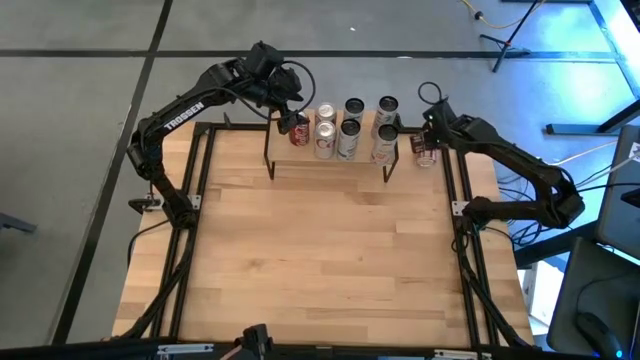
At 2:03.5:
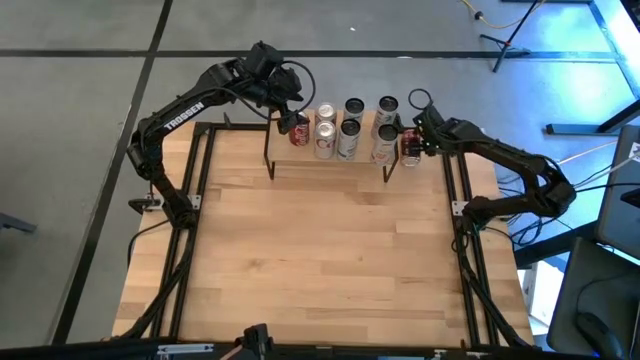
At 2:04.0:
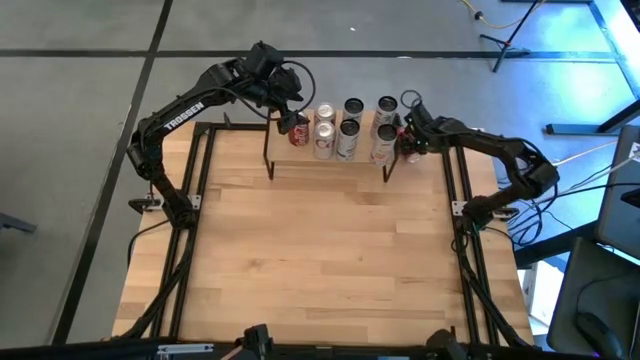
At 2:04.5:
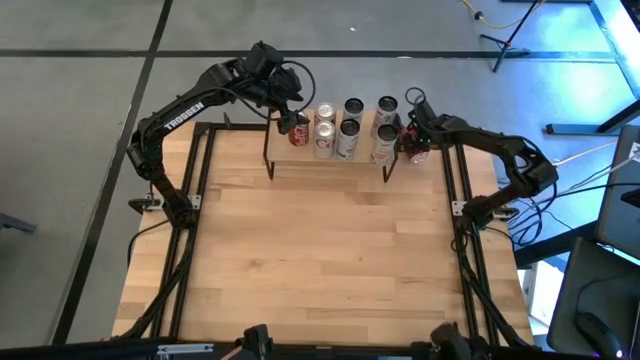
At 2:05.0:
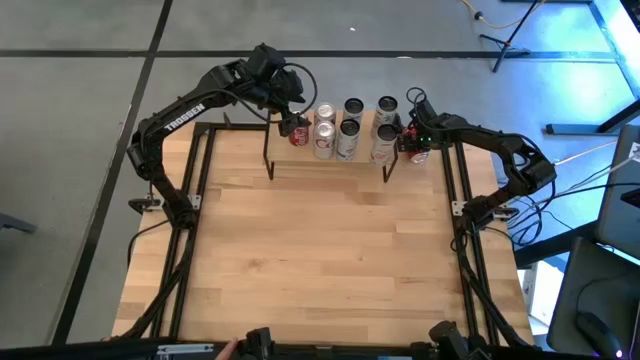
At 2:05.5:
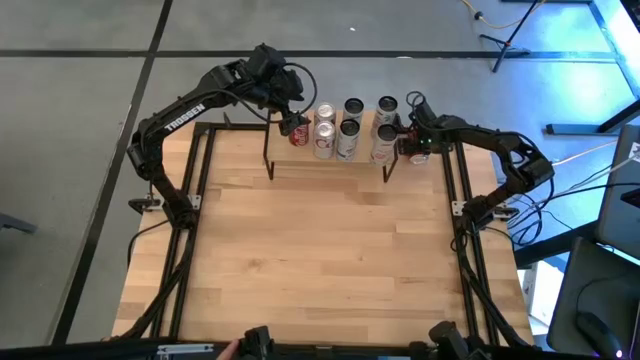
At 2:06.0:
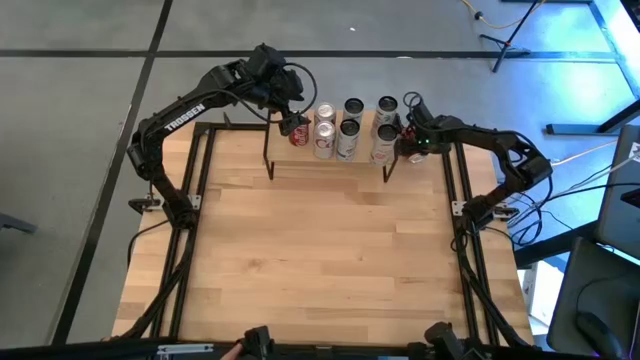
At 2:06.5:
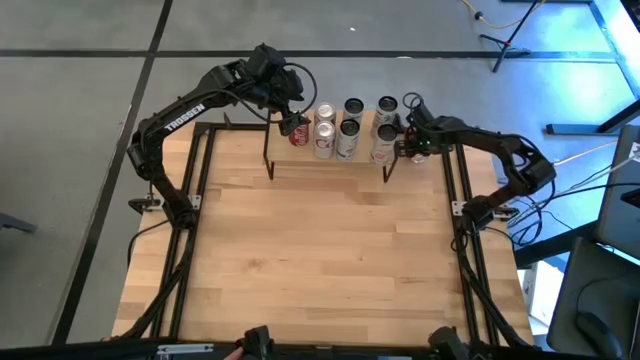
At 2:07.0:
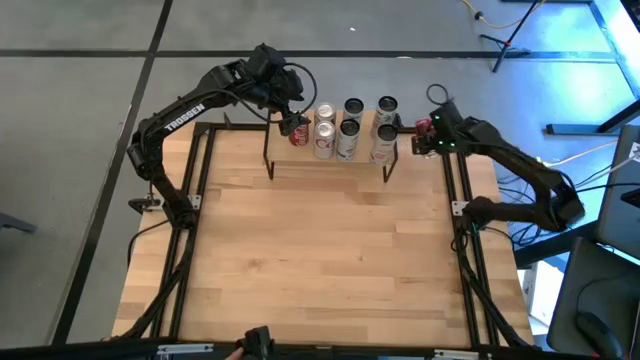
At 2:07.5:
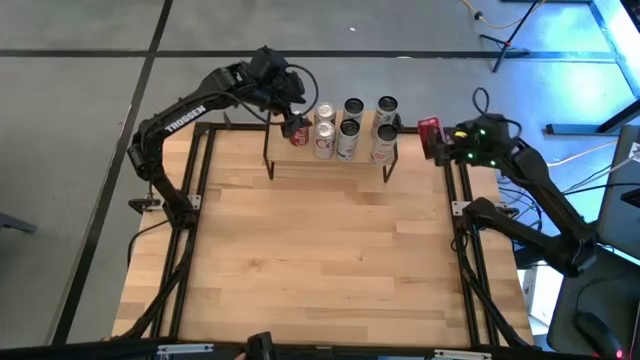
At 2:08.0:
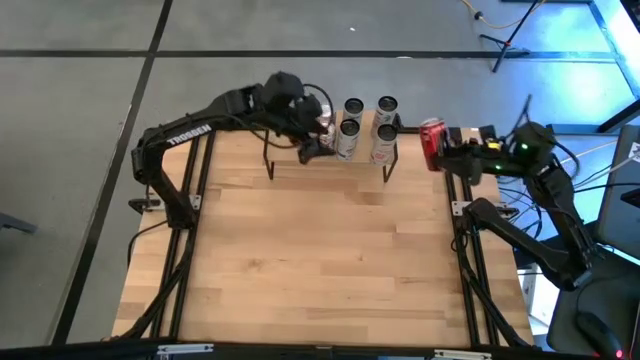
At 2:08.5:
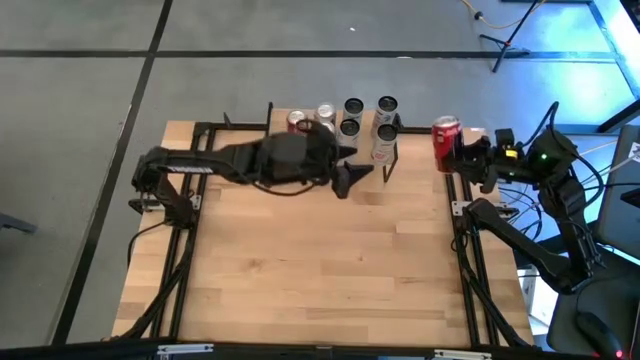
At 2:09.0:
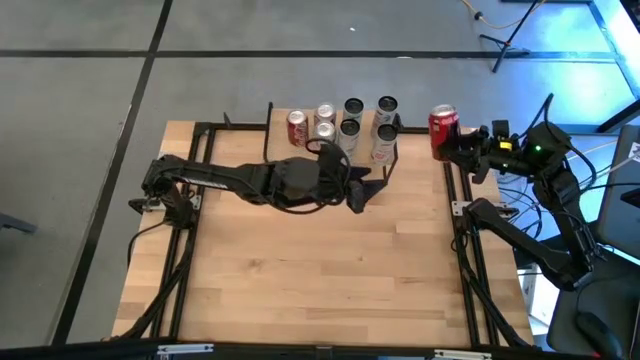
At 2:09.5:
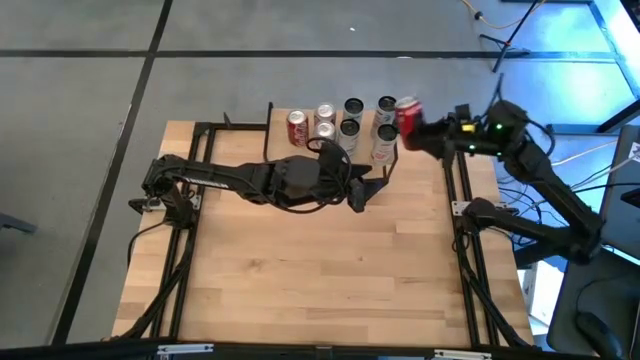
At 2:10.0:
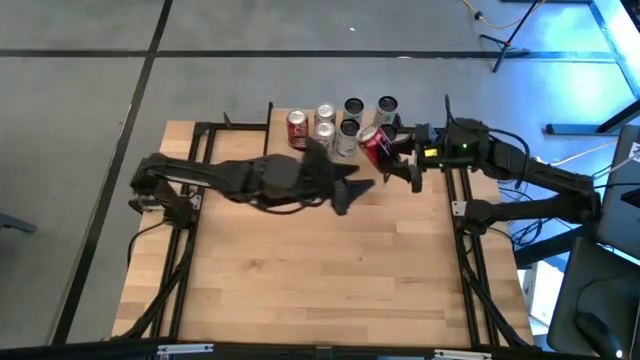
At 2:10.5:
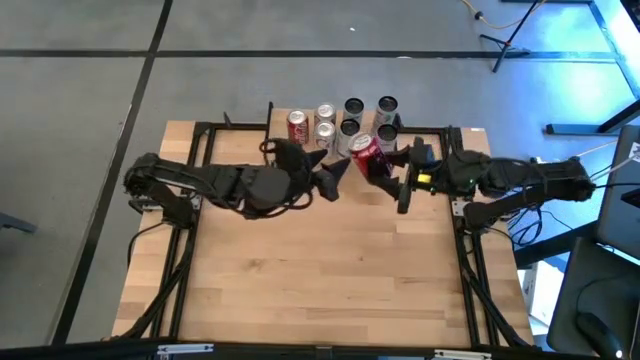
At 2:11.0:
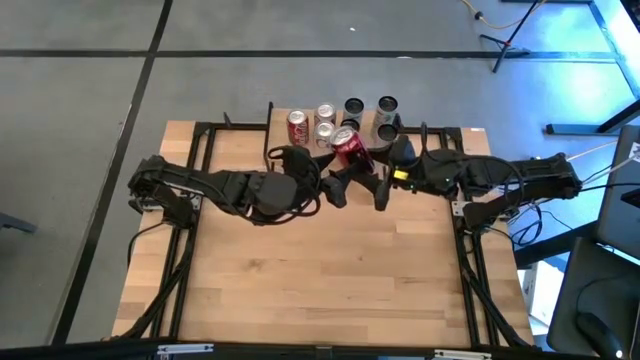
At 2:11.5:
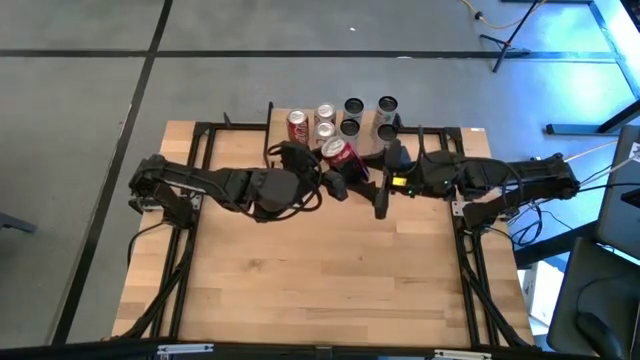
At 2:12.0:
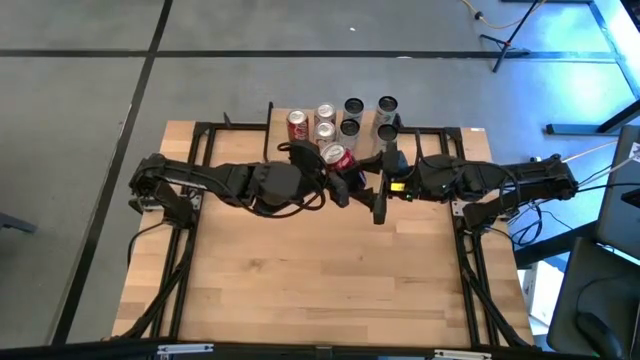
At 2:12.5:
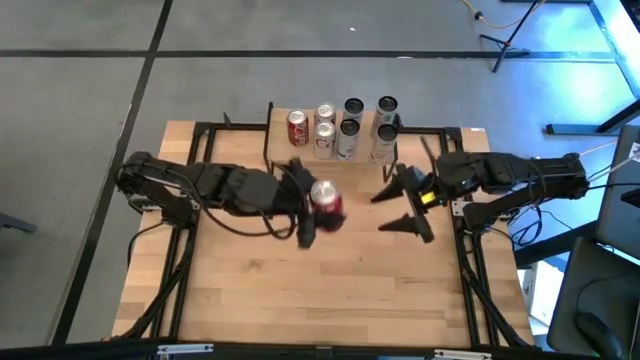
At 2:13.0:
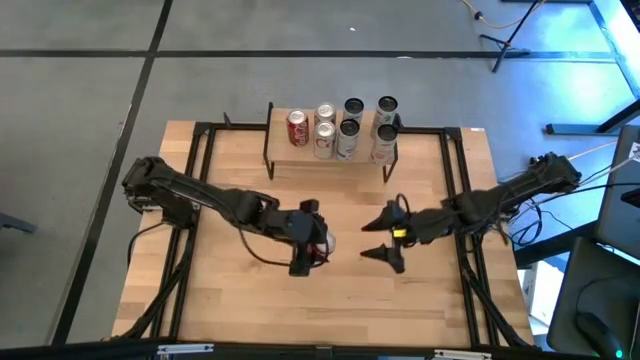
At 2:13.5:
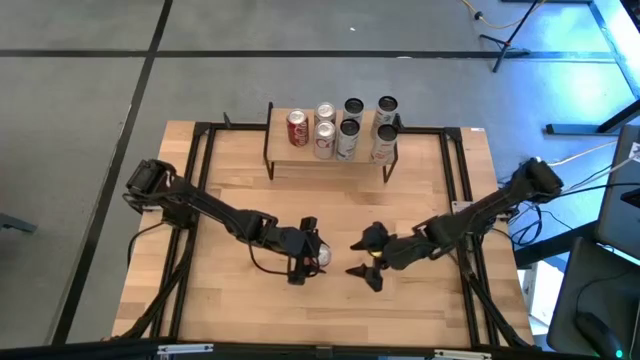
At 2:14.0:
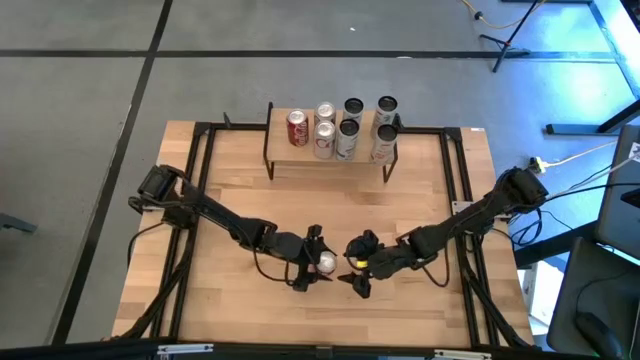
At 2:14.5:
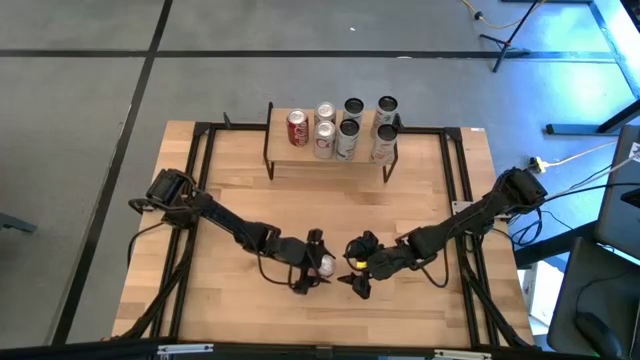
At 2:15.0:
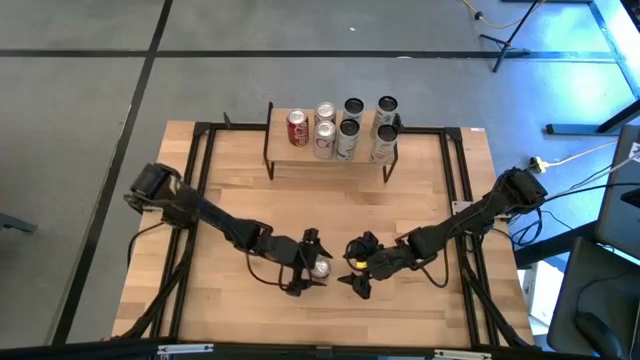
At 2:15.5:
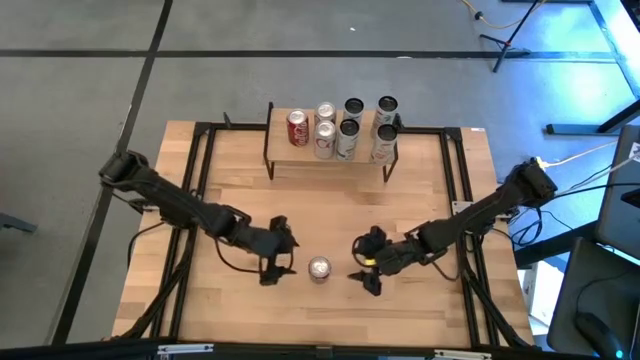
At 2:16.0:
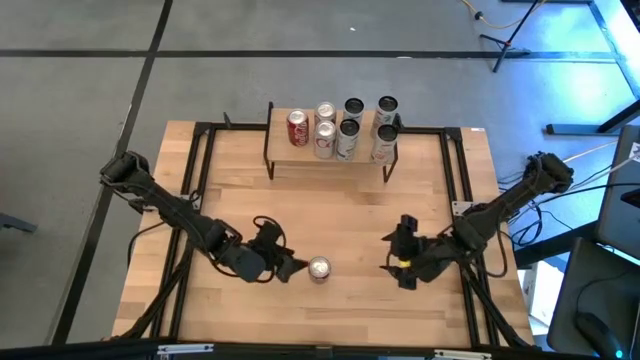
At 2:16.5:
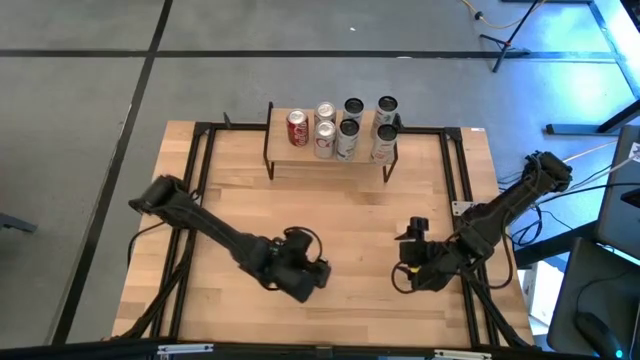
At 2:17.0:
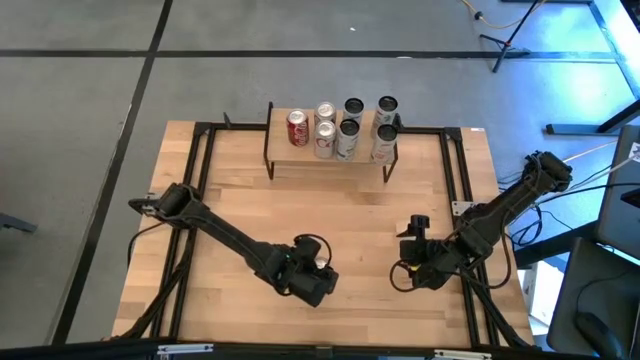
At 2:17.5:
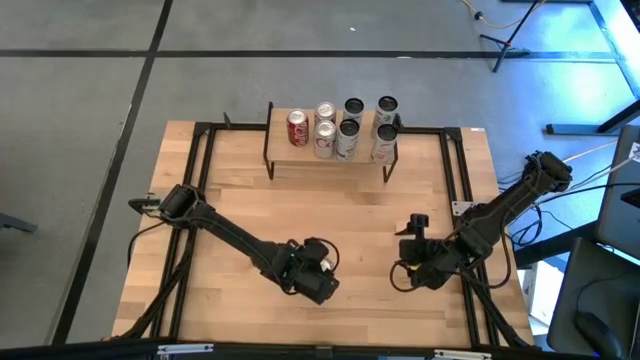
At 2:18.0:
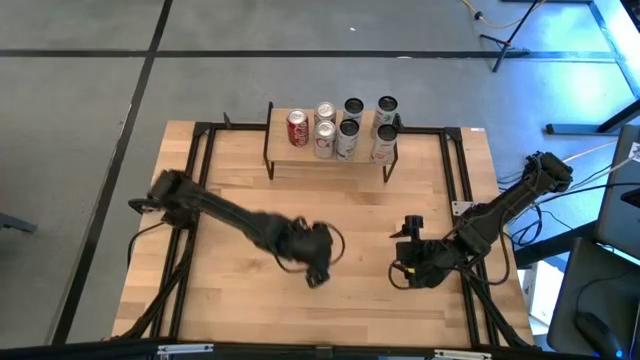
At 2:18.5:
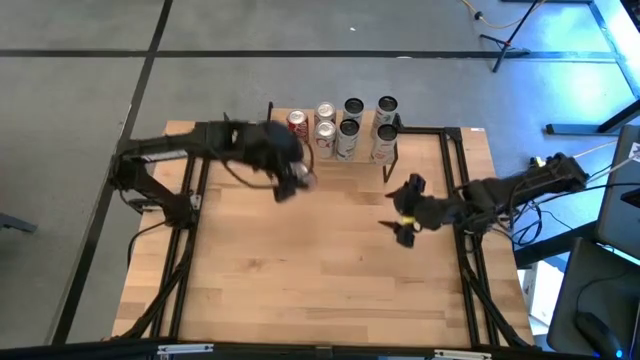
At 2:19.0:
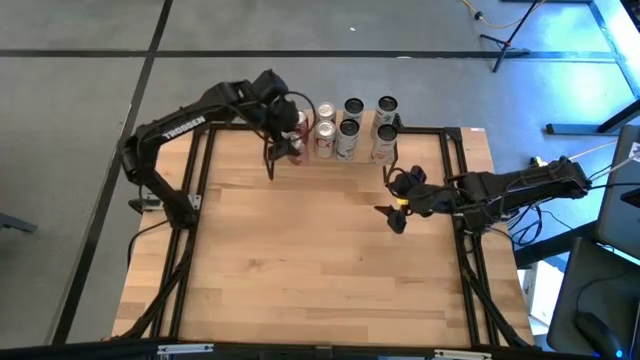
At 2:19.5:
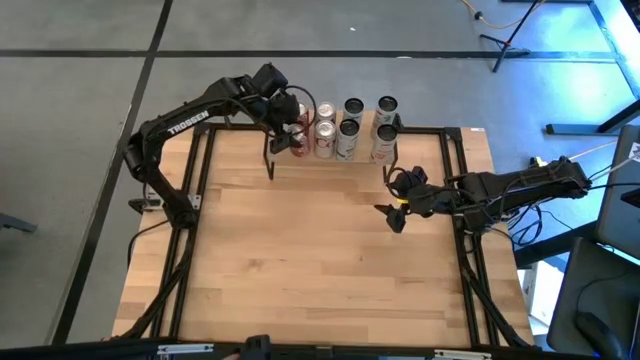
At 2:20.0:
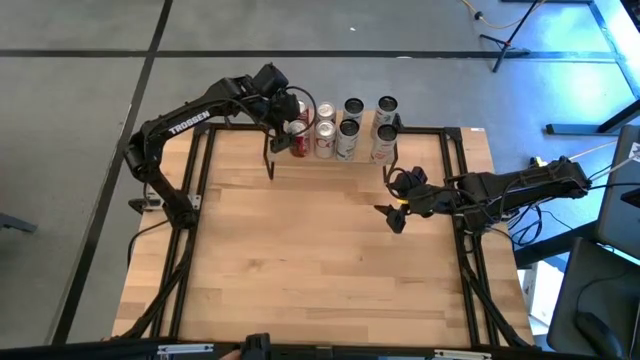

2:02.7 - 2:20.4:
Task: Place canned beverage on shelf
Put the red soda can on the shelf aligned with the other red soda can

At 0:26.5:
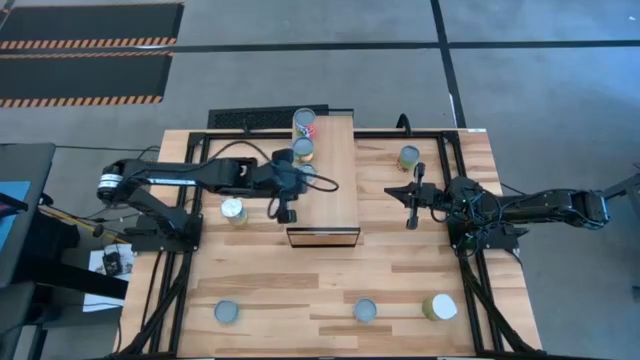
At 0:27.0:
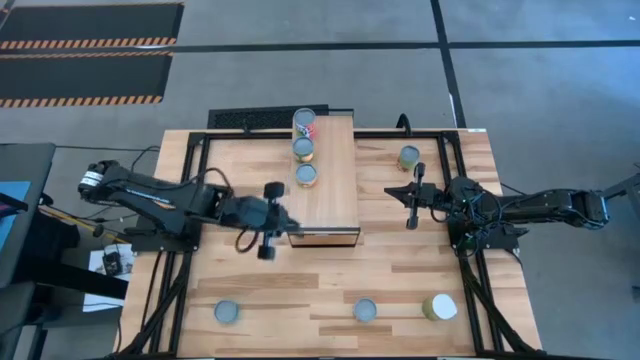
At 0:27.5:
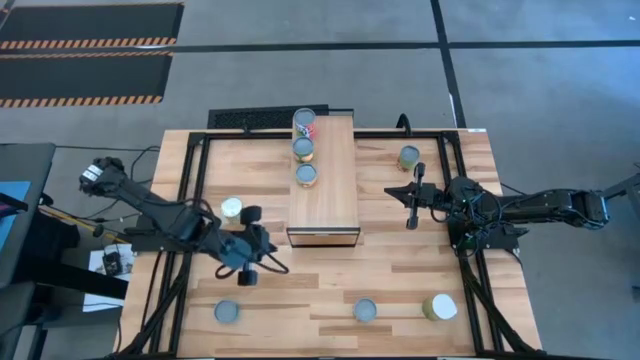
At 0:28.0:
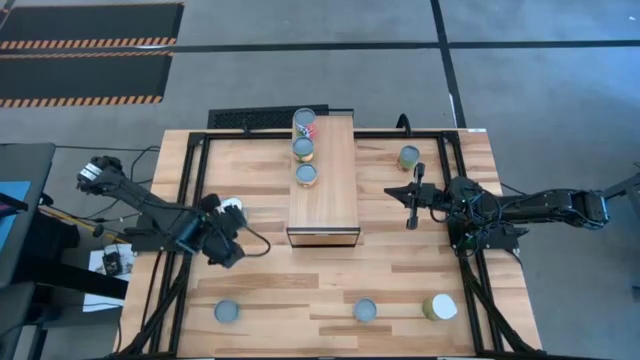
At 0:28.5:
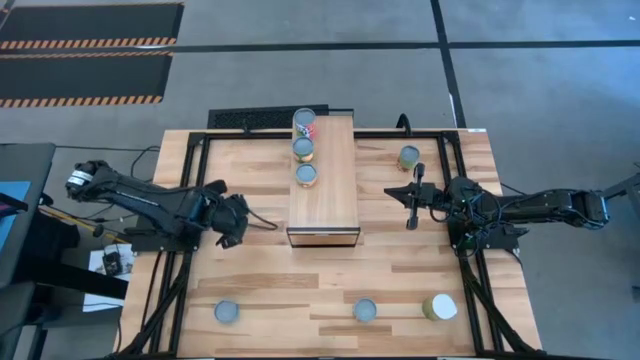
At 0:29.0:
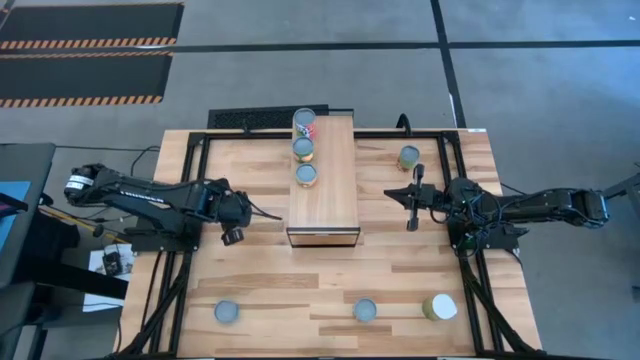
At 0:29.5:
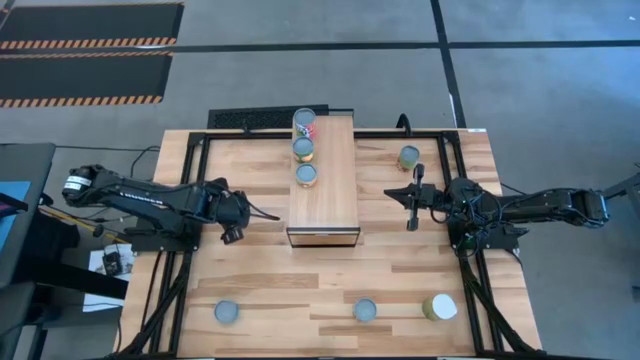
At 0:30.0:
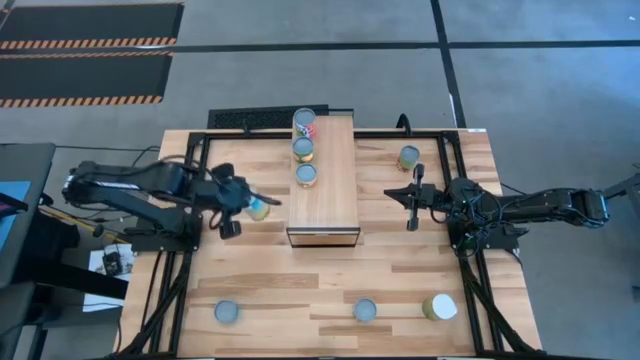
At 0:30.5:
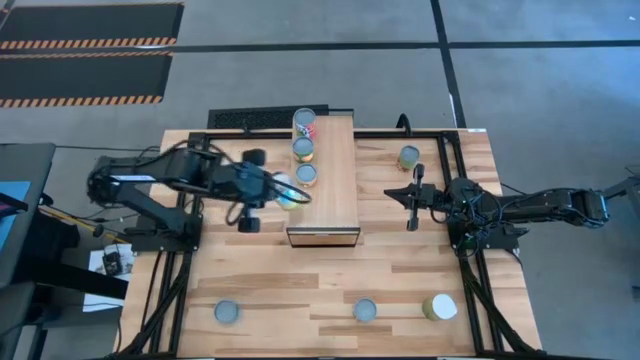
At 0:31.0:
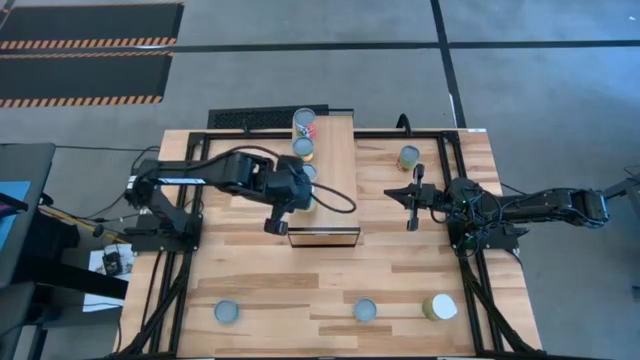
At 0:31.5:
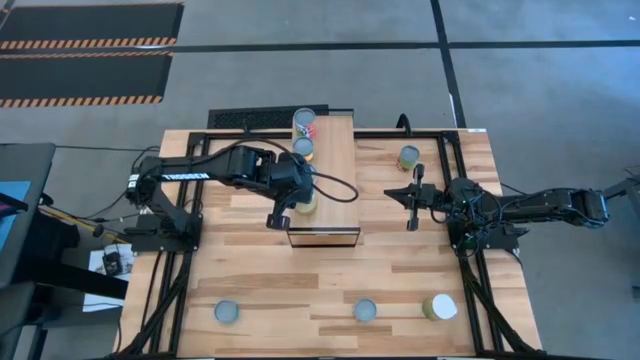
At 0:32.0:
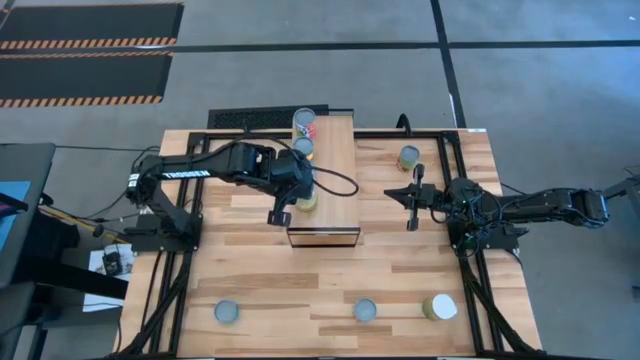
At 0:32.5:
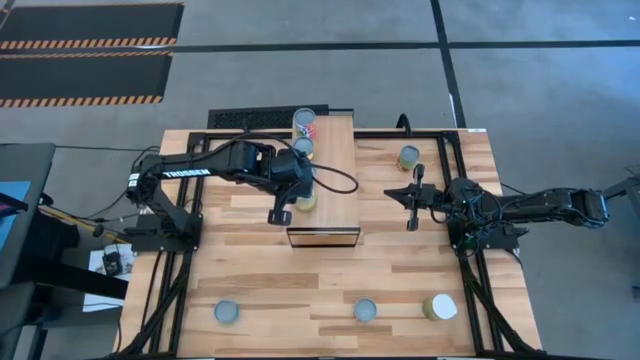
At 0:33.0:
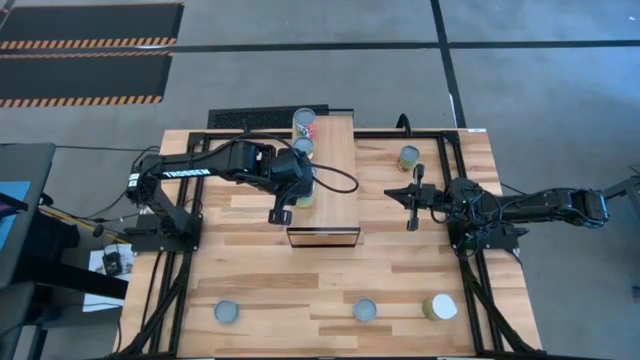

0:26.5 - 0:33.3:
Task: Pick and place cans onto a shelf
Put the canned carrots on the shelf
